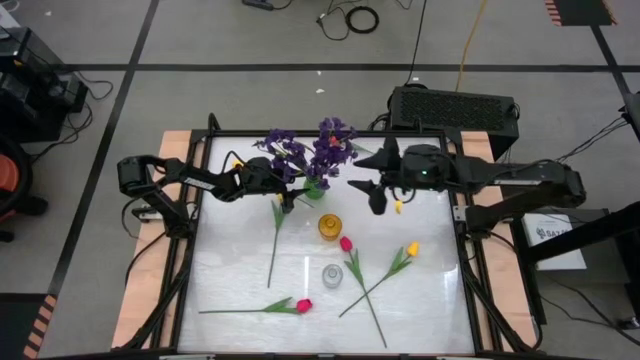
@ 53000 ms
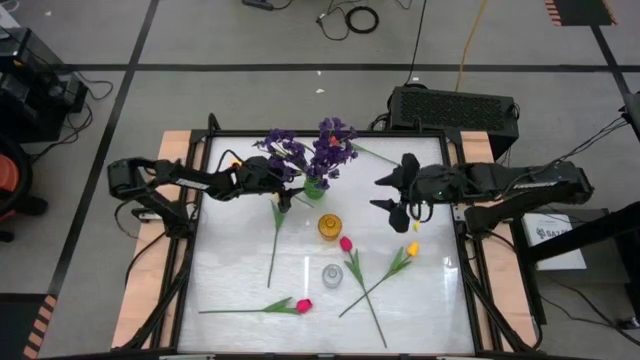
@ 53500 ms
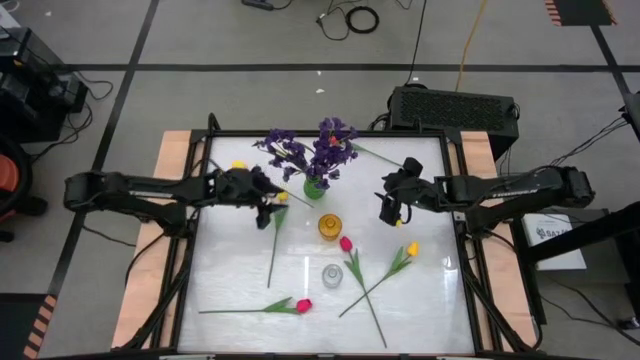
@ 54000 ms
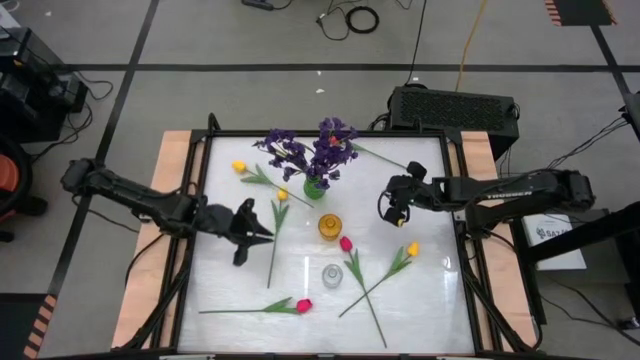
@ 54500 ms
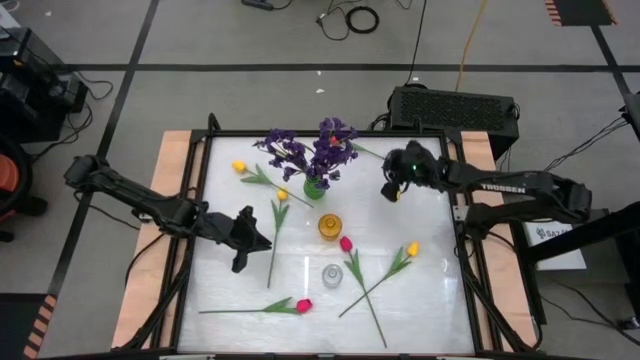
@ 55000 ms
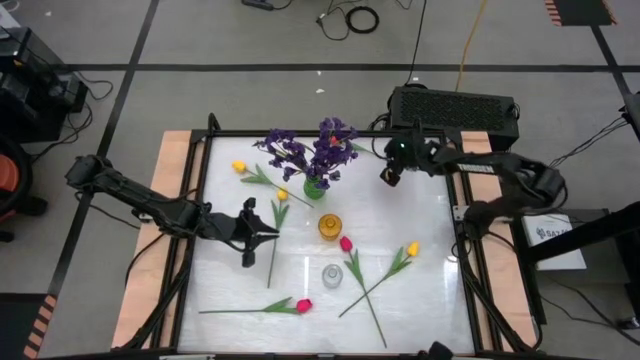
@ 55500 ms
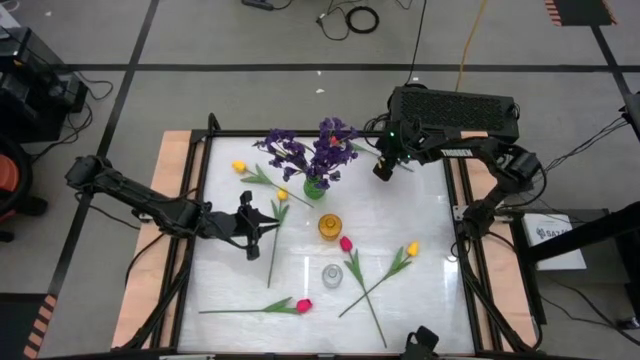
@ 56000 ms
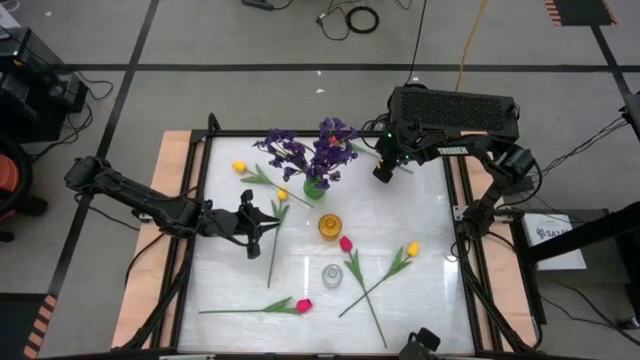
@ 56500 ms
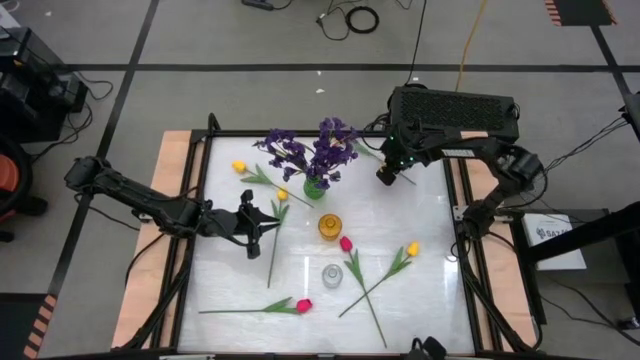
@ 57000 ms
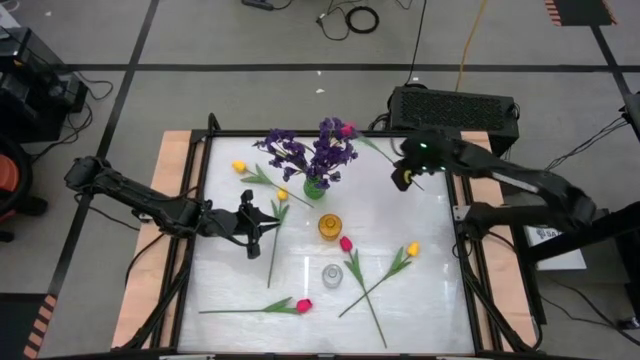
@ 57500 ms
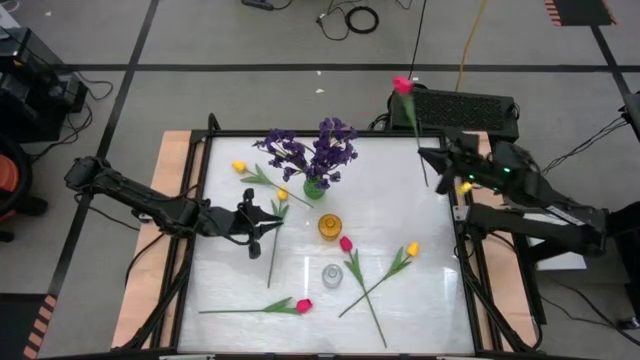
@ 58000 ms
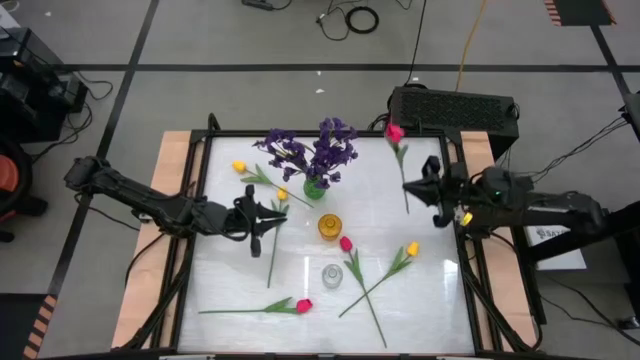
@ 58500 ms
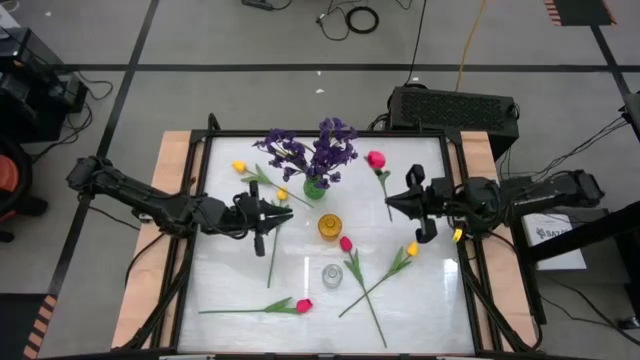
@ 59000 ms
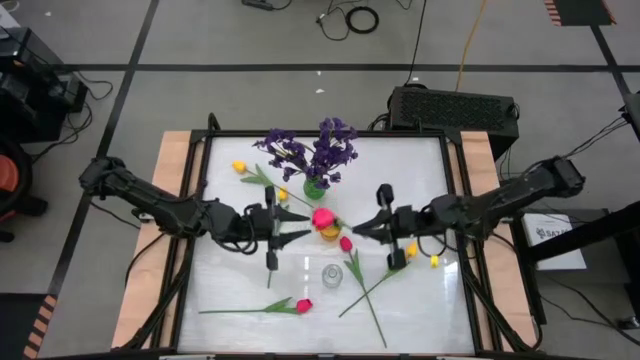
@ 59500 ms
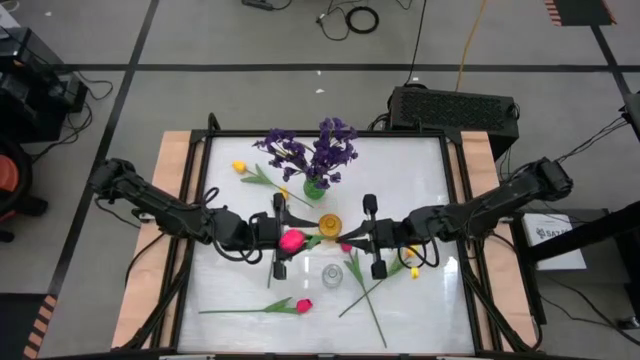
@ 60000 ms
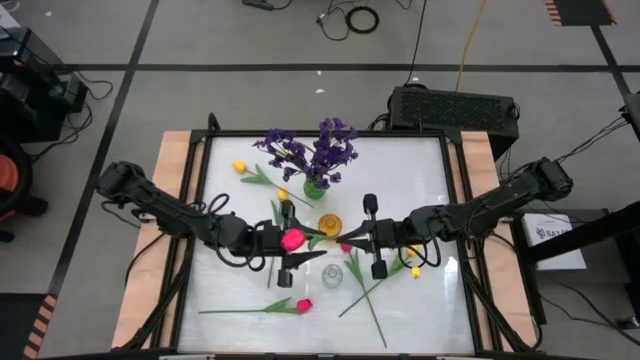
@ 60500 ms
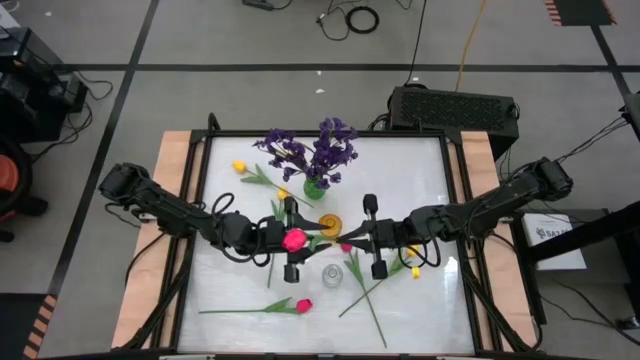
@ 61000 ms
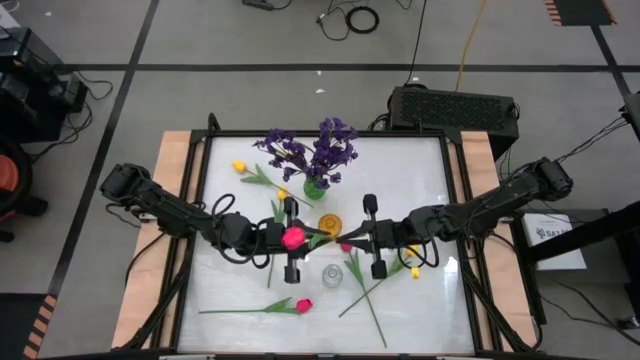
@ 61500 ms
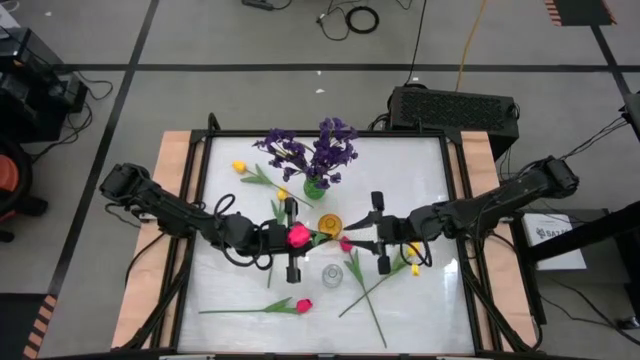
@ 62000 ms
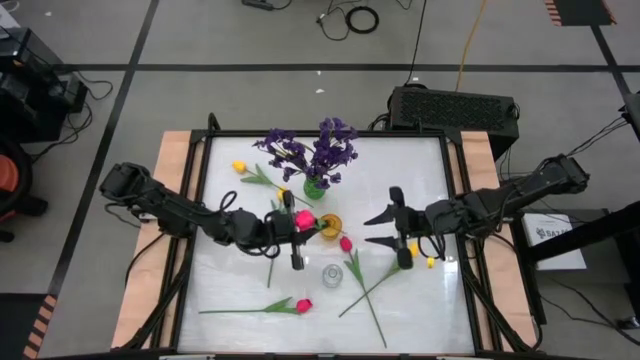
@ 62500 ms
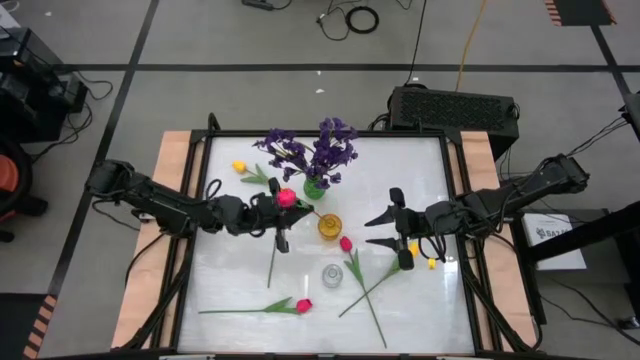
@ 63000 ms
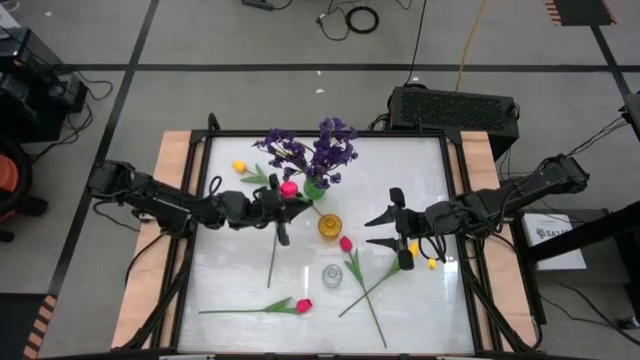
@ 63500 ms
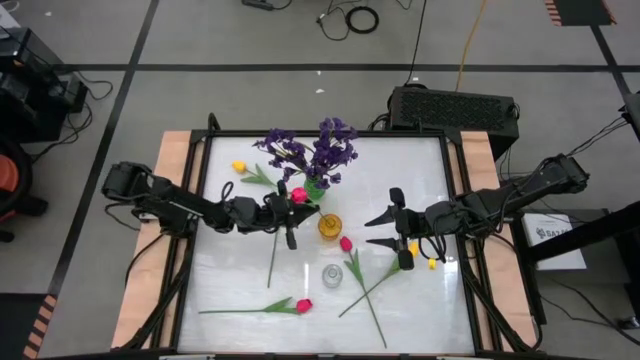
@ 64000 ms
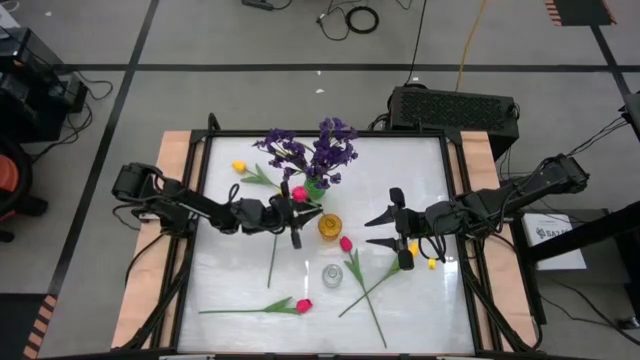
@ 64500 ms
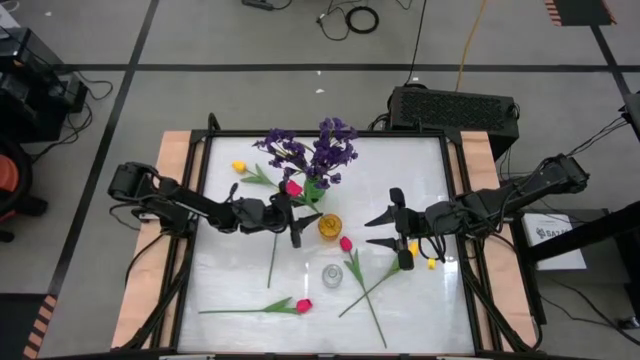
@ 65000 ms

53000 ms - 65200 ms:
Task: Sort flowers into vase by color
Put the top right pink flower into the yellow vase

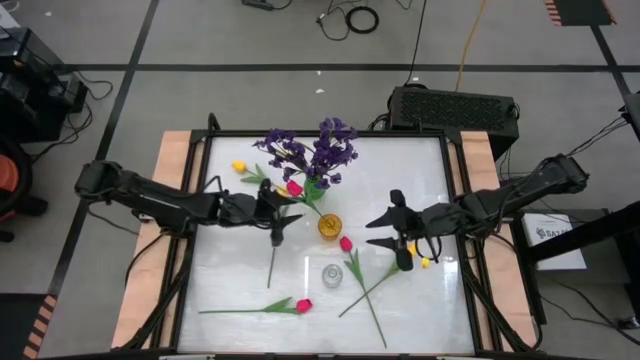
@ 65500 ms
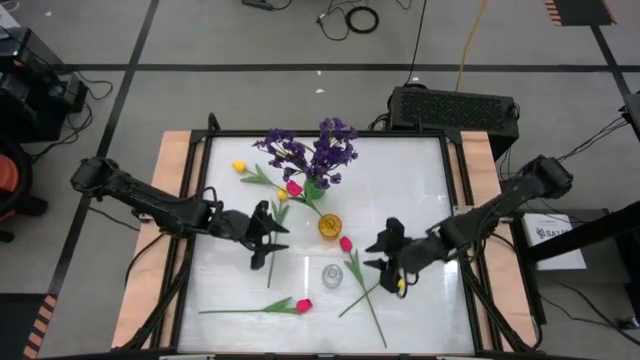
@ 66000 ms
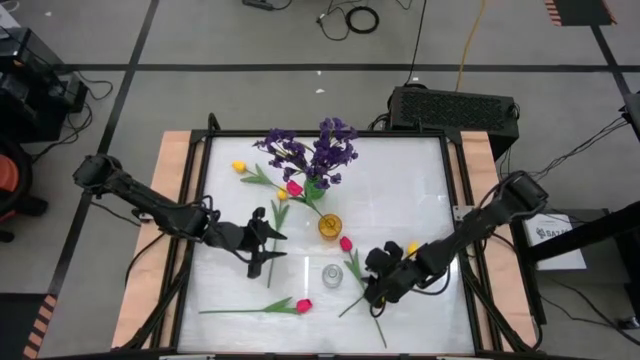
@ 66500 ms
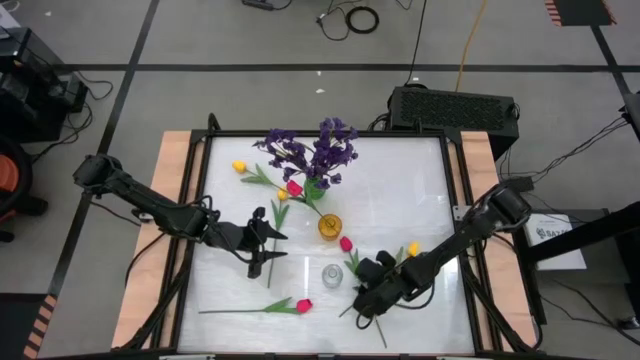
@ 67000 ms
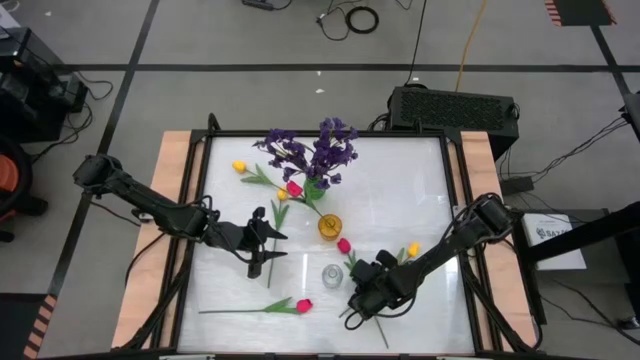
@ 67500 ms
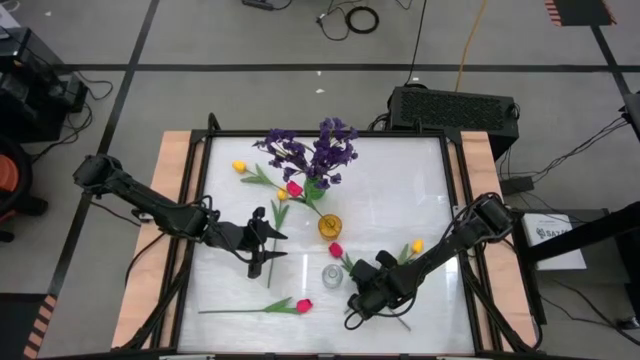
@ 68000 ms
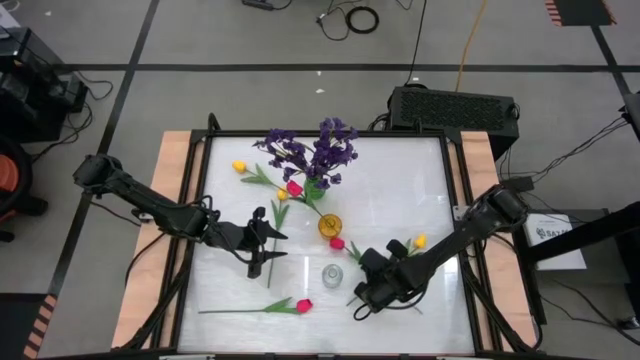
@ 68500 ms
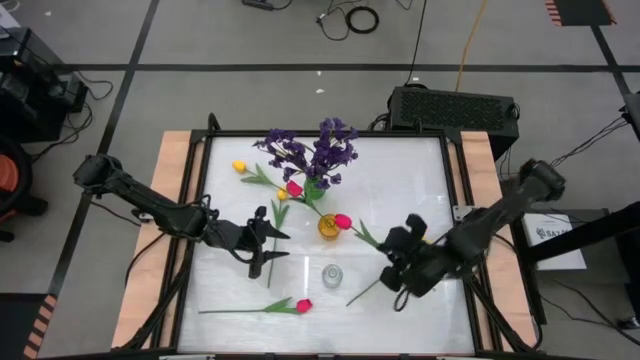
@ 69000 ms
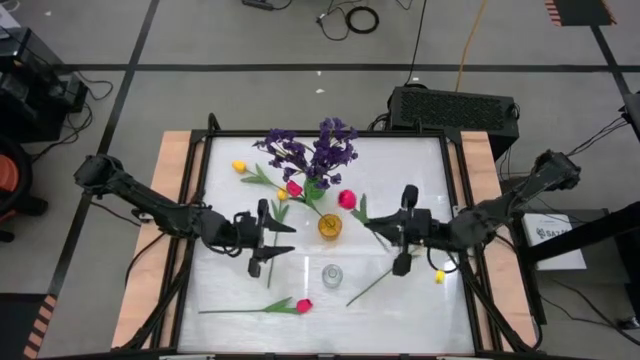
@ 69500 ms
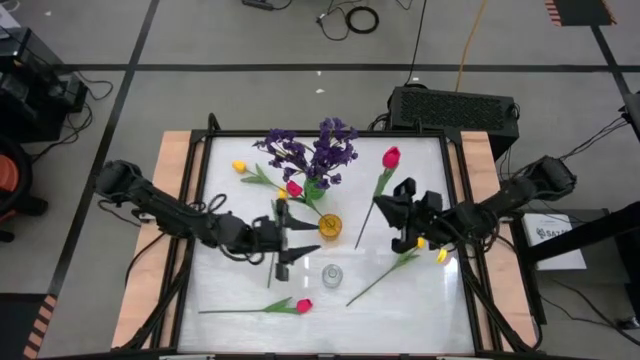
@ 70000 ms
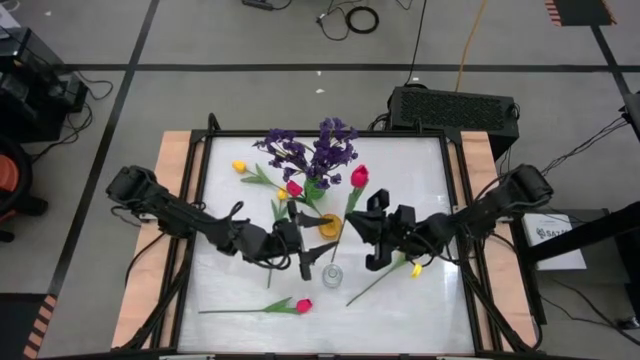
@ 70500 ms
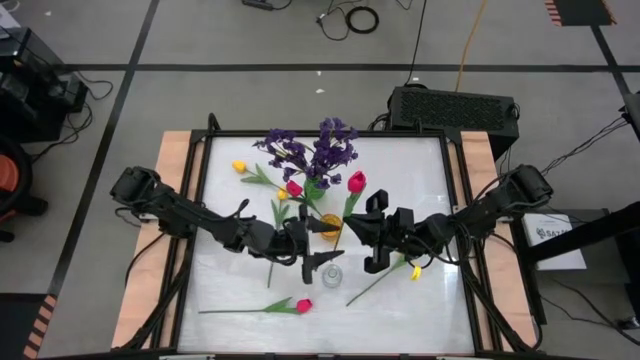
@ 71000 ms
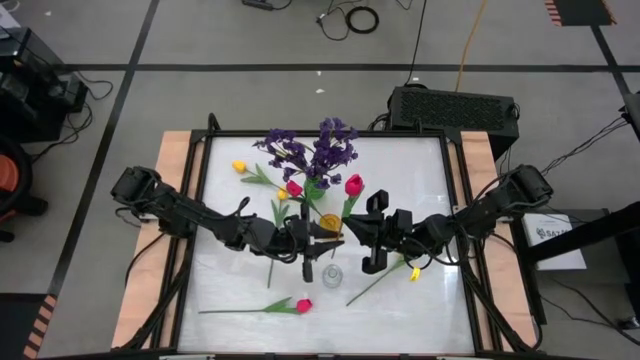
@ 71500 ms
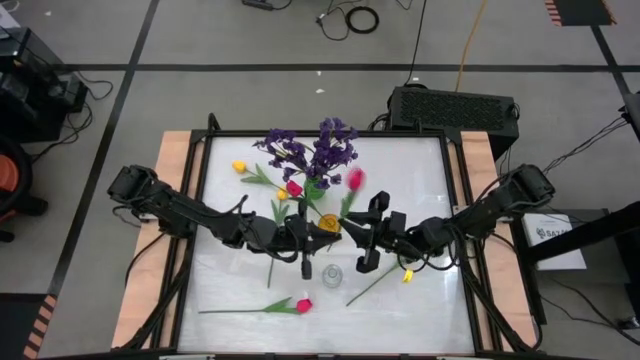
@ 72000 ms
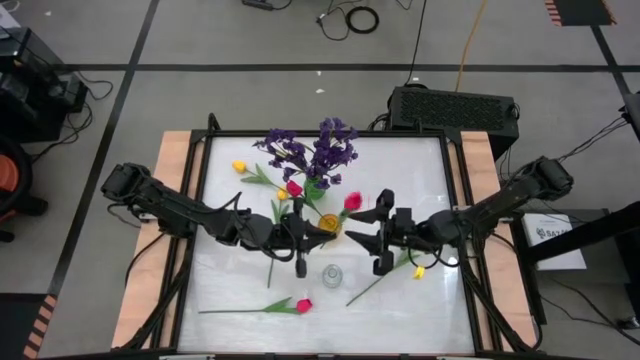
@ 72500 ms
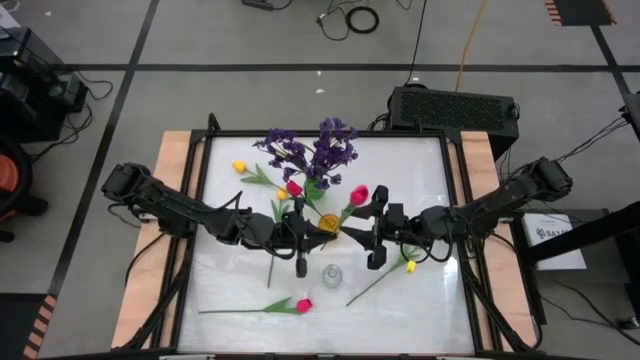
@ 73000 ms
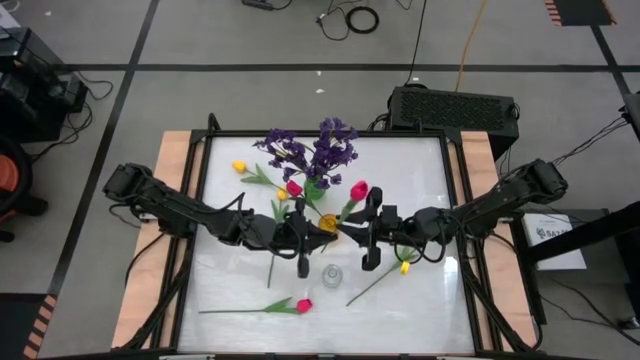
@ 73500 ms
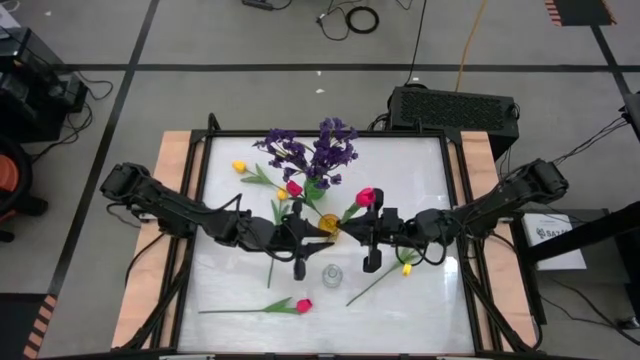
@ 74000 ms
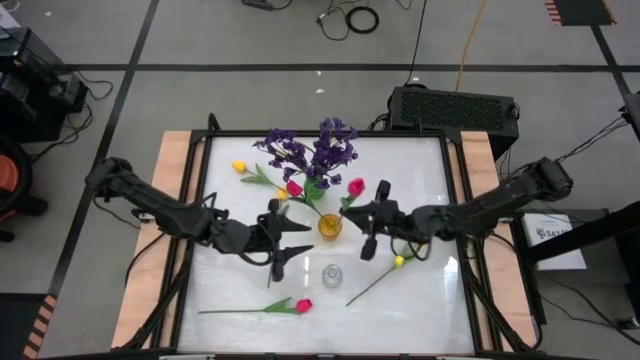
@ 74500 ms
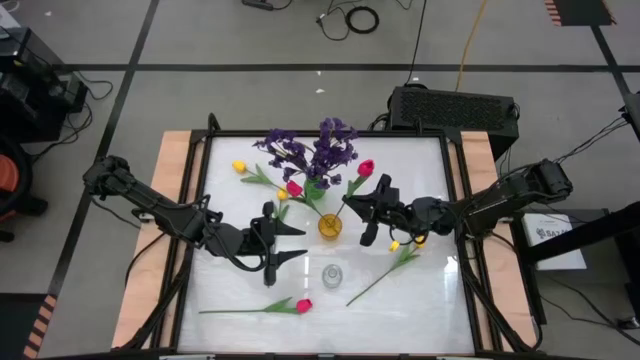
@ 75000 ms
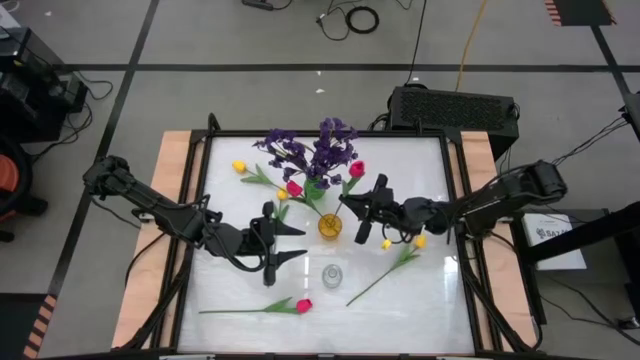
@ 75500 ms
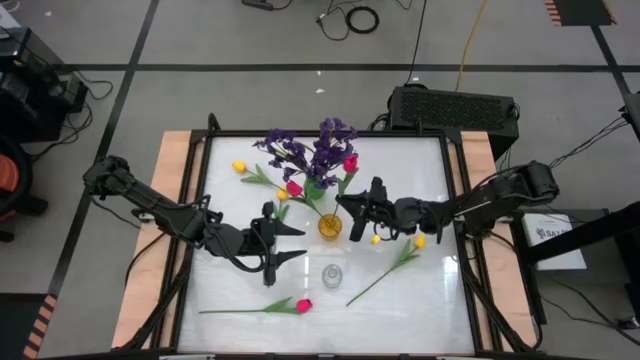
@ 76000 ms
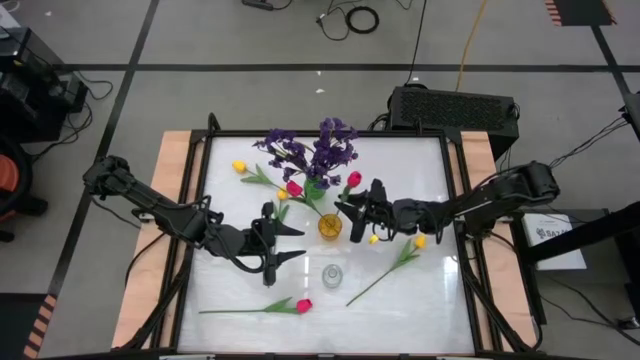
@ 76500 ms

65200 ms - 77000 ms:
Put the right pink flower into the yellow vase
